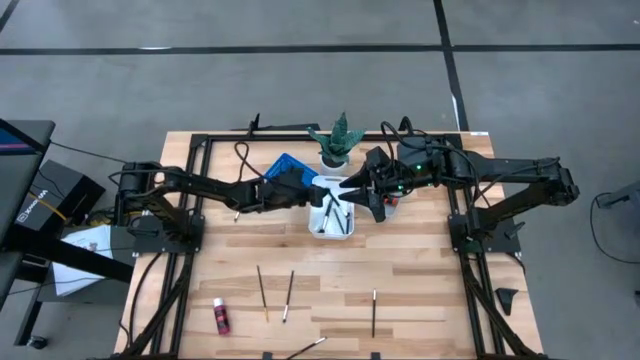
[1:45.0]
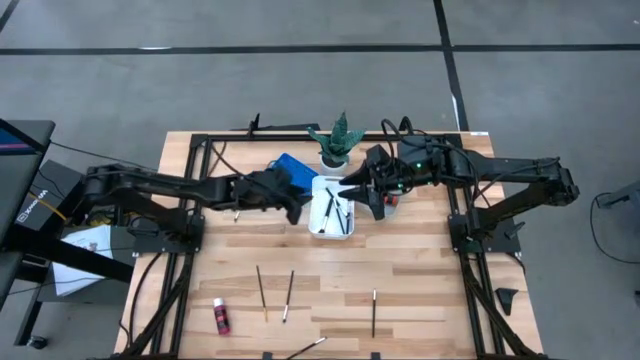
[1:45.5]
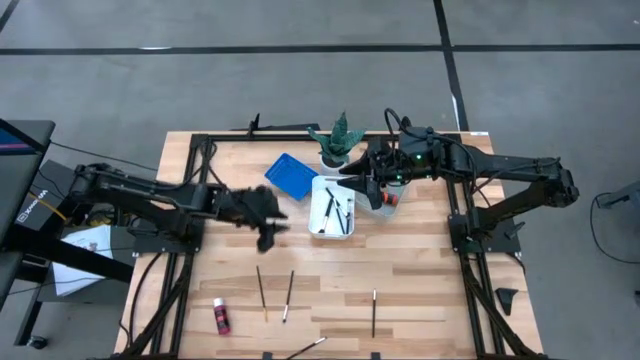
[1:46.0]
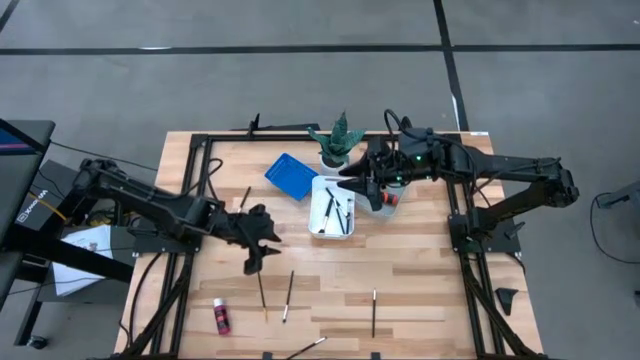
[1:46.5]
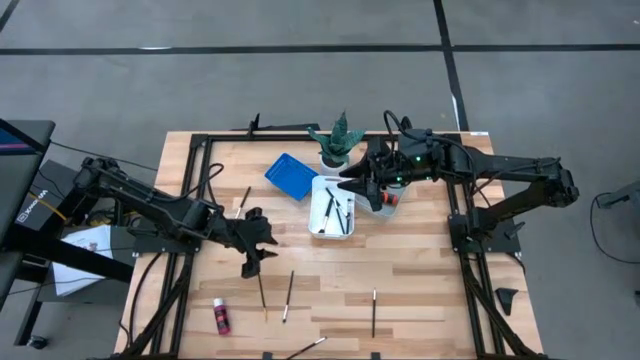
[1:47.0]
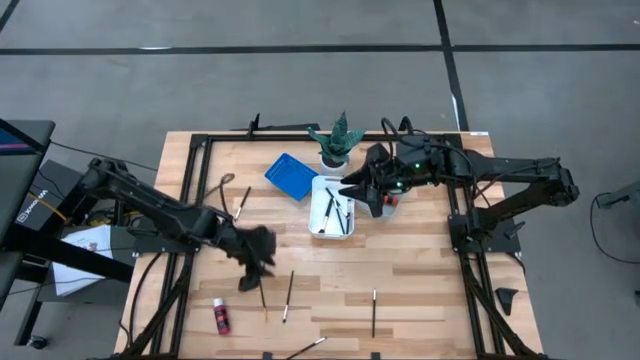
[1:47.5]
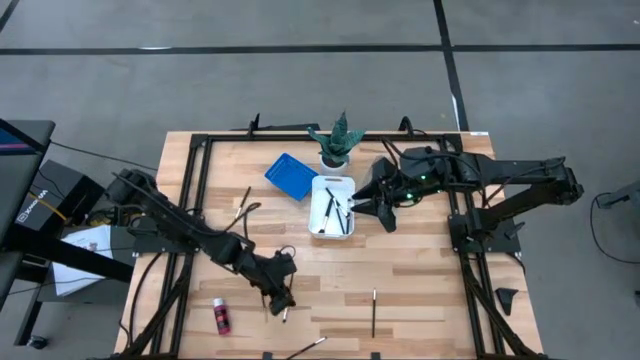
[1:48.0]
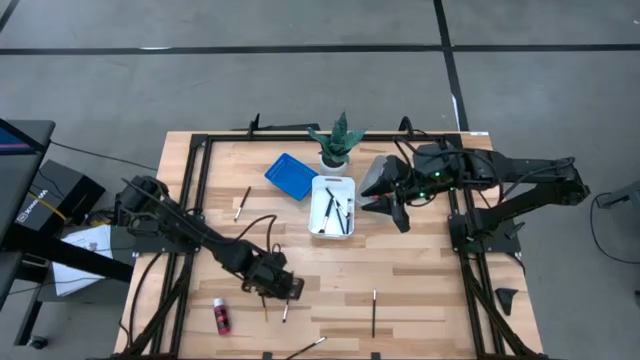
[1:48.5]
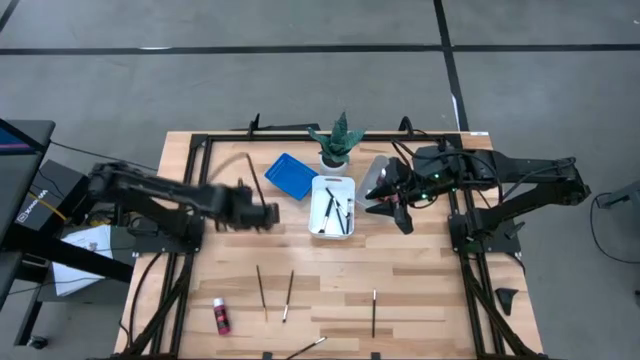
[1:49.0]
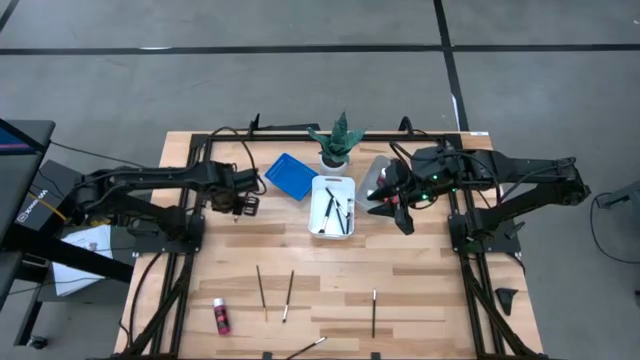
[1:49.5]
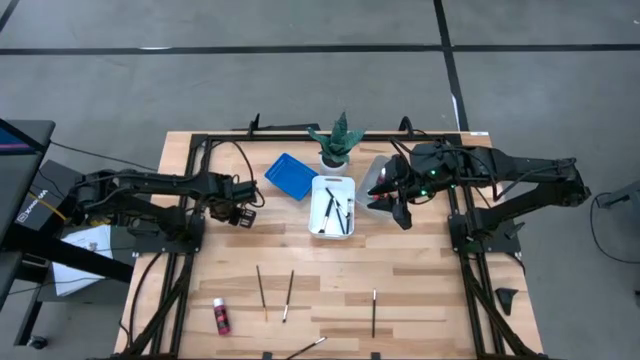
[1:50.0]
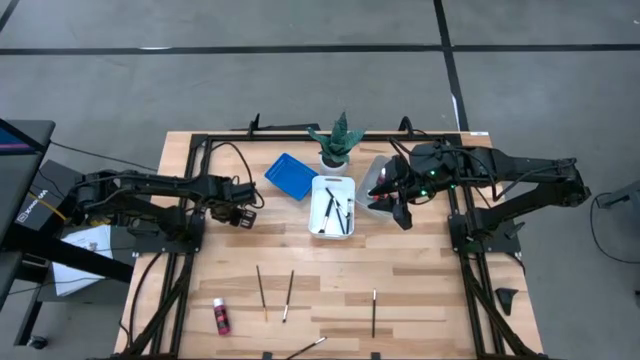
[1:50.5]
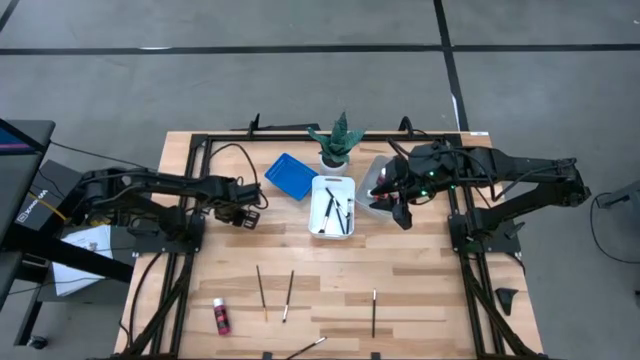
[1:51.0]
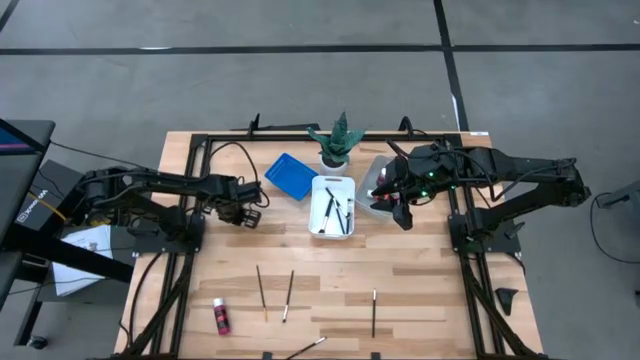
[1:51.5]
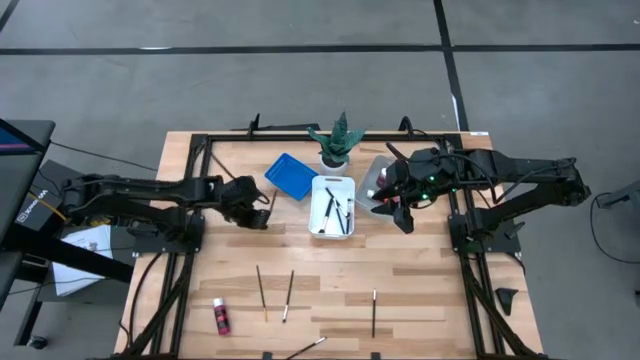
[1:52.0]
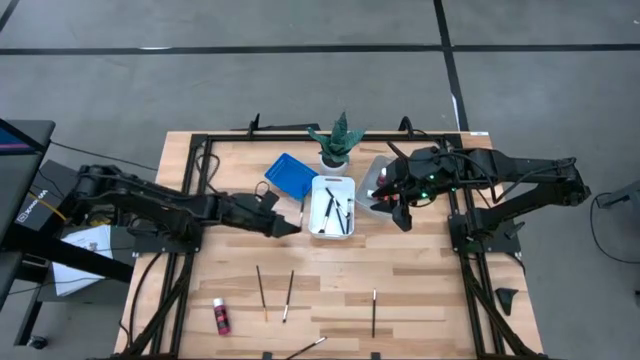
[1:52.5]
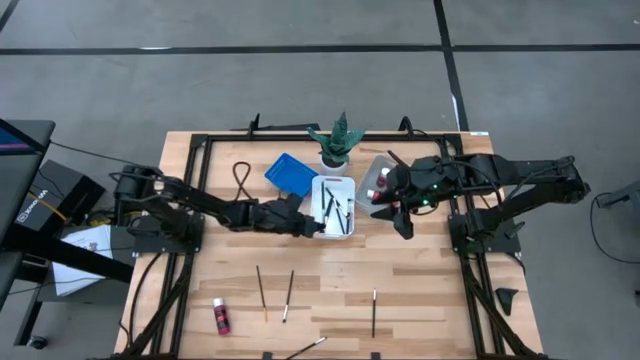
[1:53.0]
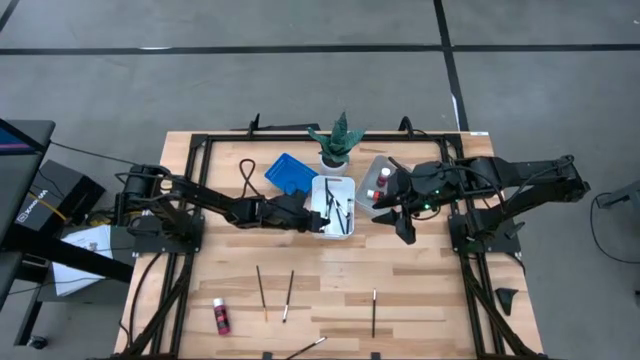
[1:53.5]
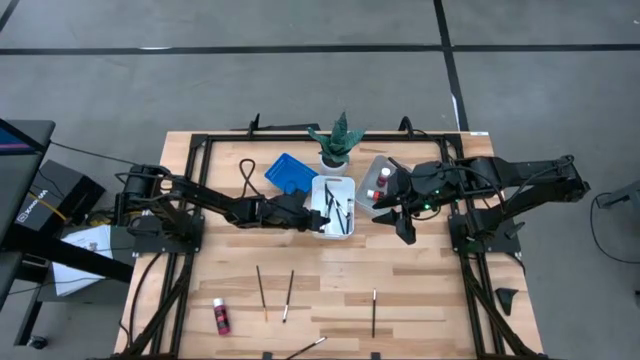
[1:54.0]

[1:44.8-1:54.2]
Task: Pick & Place Paint Supplies
Put the large black paint brush into the white bin

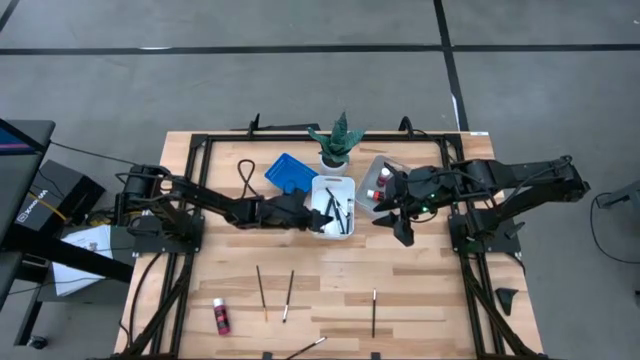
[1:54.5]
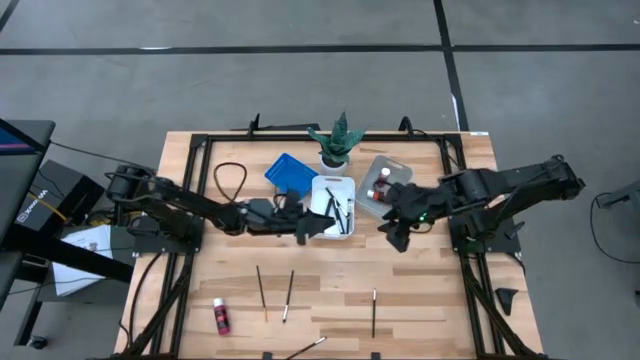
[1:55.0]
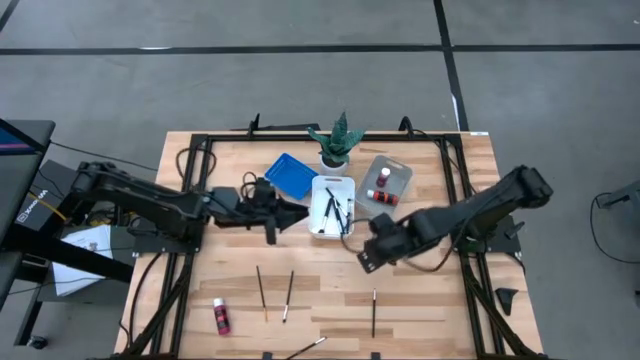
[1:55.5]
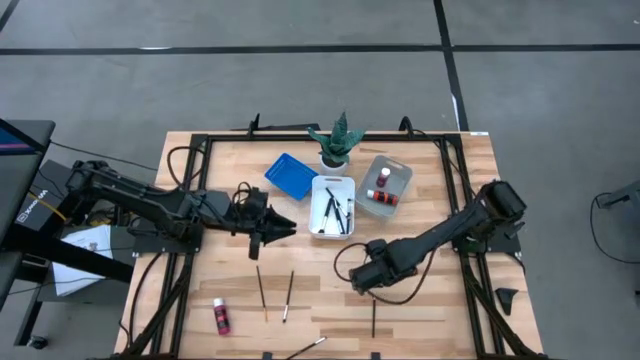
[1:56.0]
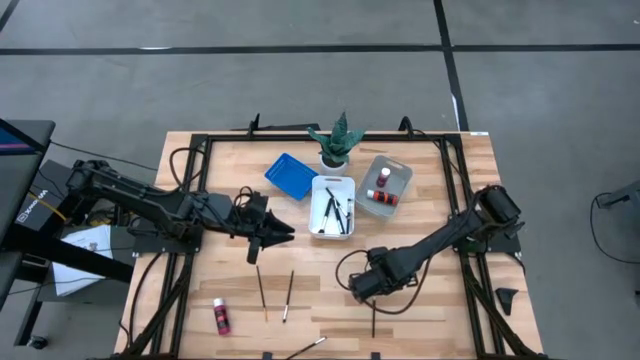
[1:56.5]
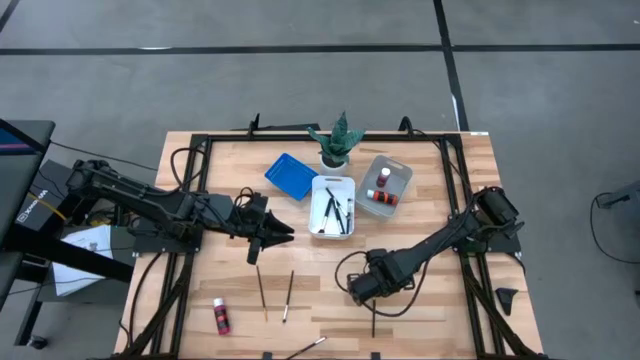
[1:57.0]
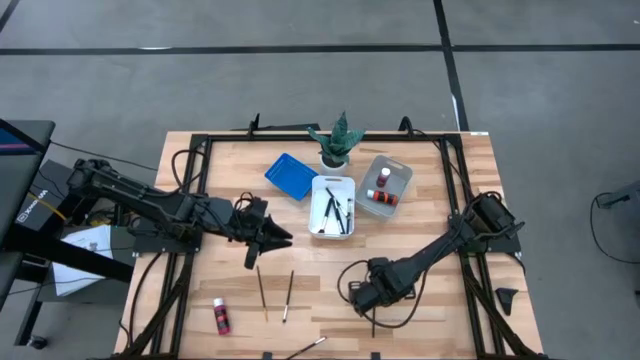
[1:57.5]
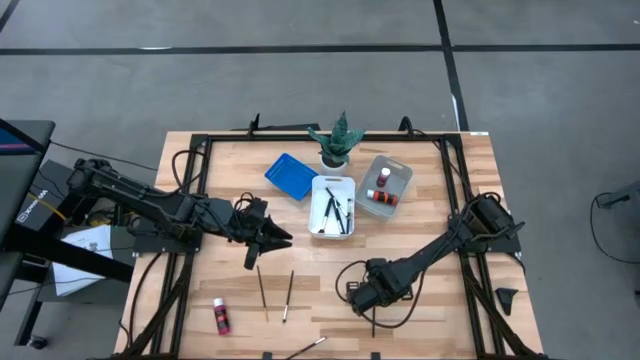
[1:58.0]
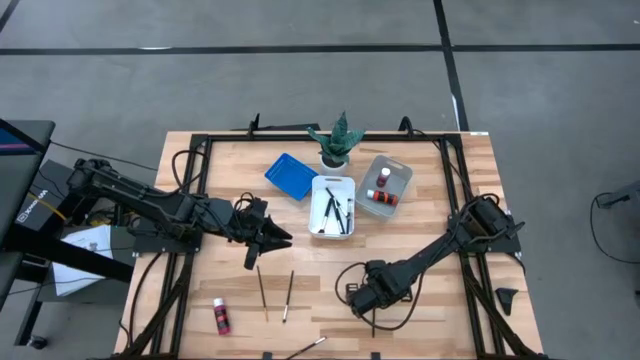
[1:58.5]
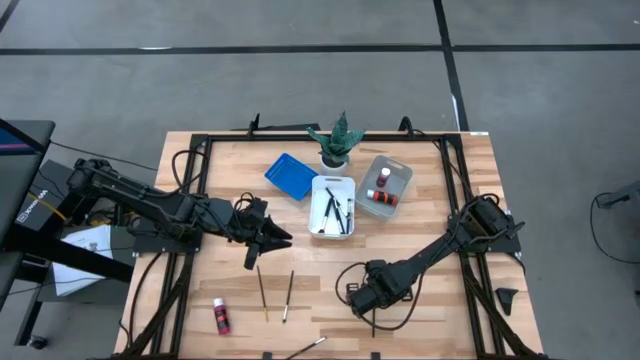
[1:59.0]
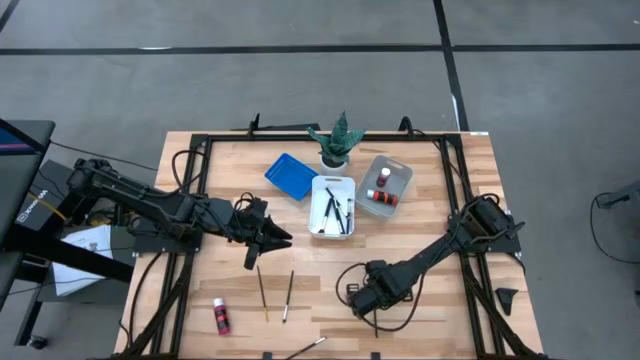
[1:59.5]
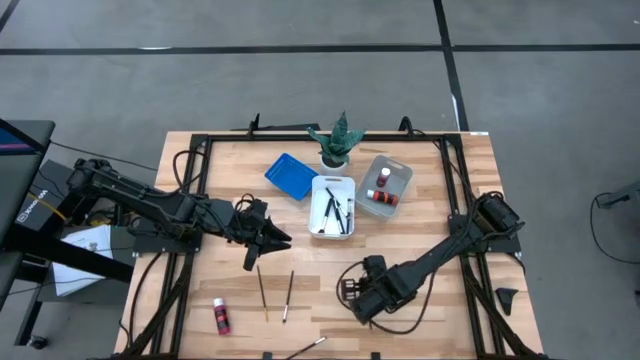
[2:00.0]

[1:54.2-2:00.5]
Put the small black paint brush into the blue bin

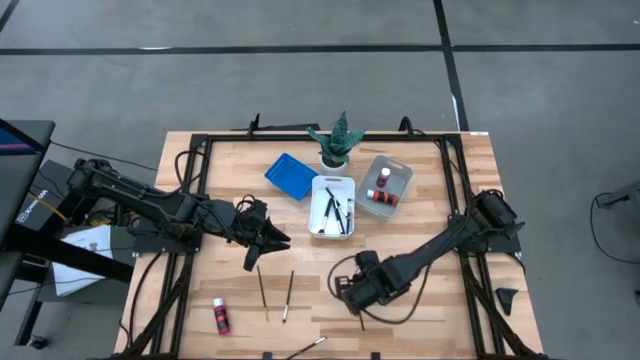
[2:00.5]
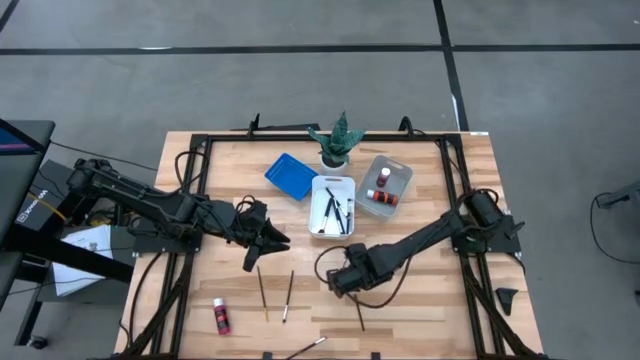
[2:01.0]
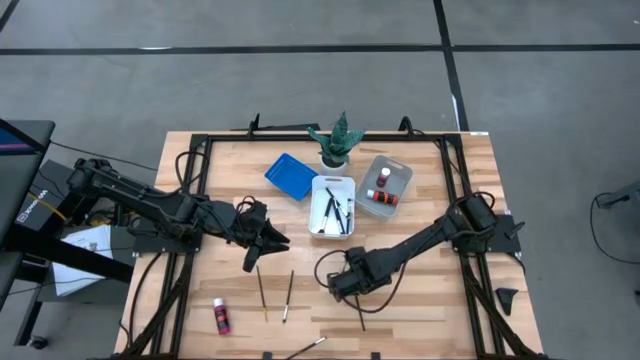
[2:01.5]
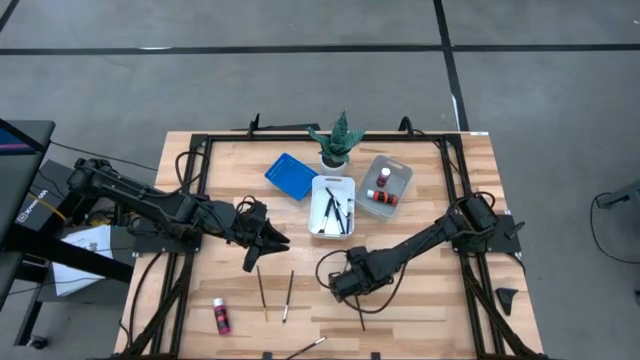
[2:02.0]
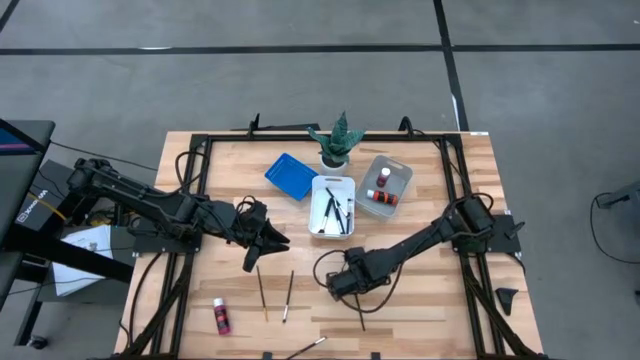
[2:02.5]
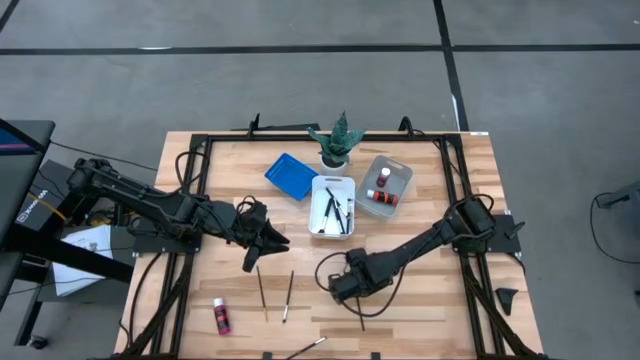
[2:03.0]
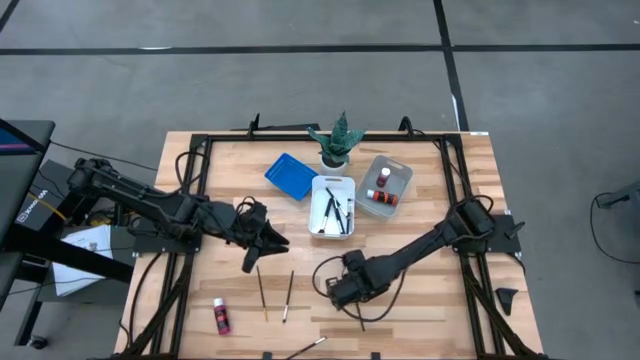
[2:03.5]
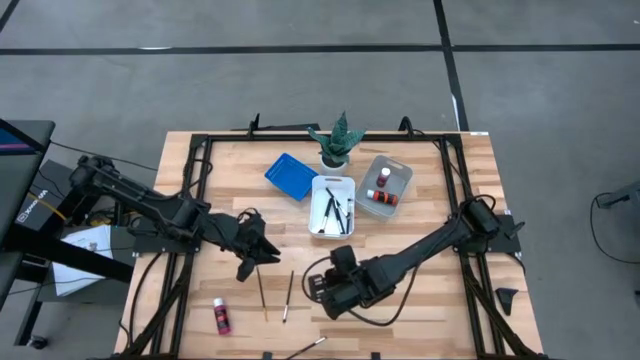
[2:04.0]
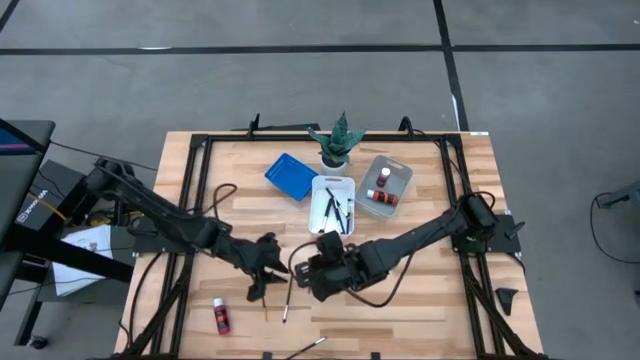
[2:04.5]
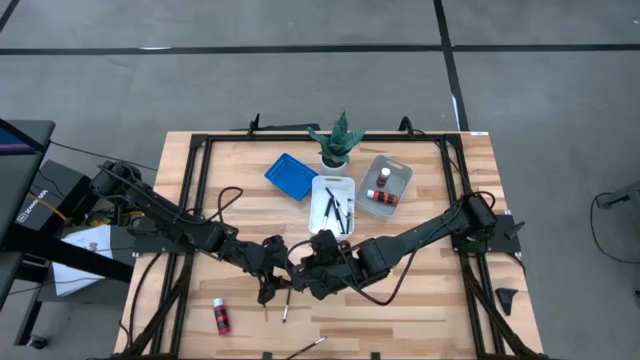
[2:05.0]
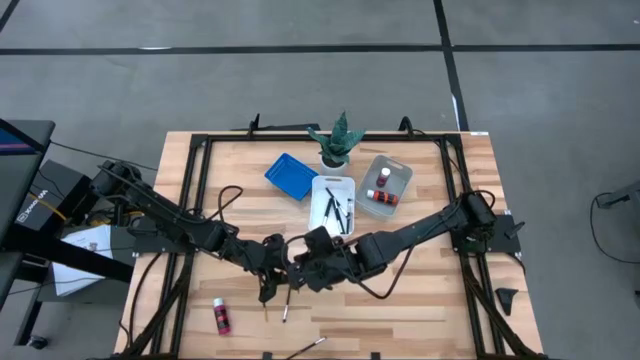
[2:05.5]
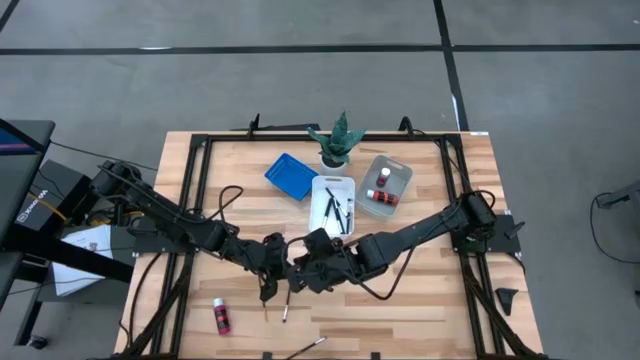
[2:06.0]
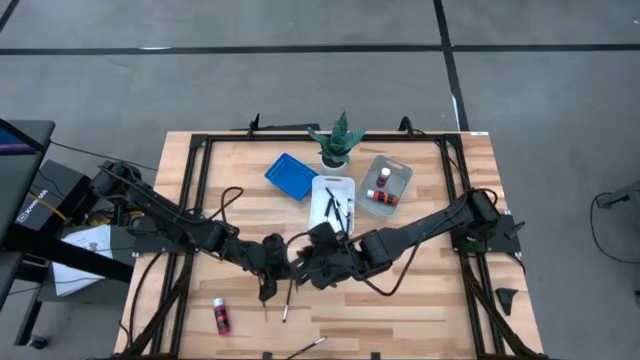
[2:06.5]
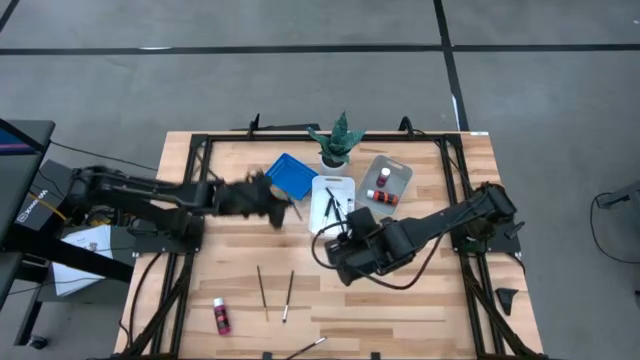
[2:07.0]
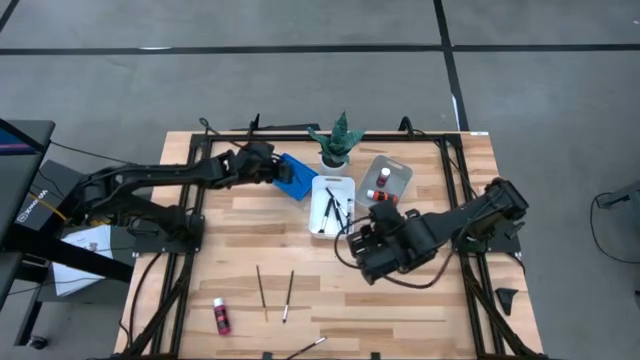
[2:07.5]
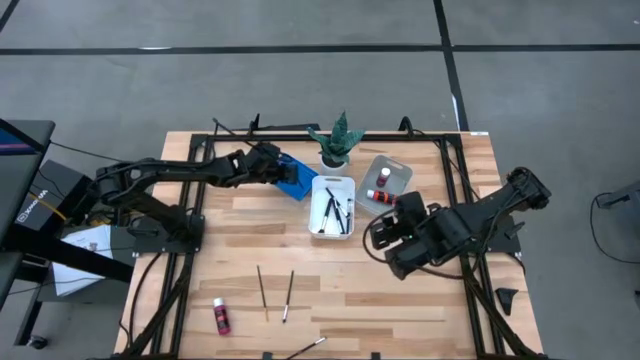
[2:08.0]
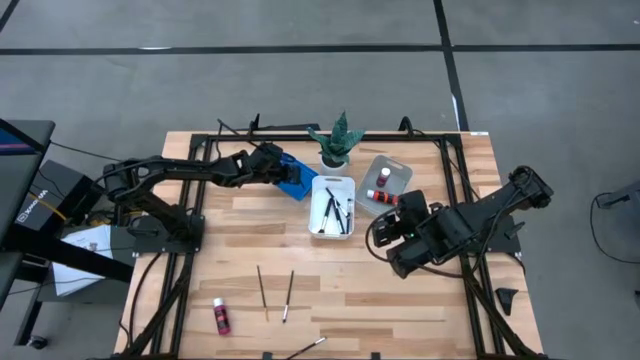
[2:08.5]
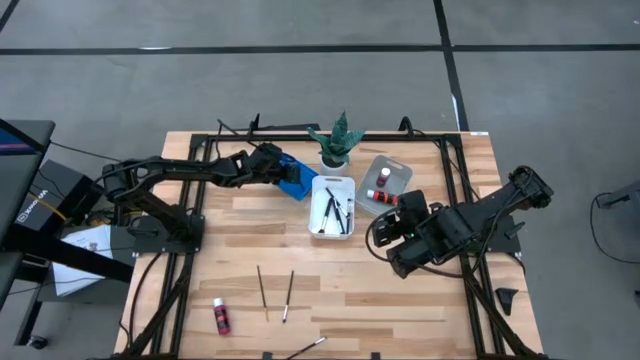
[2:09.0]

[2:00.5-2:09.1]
Put the small black paint brush into the blue bin
